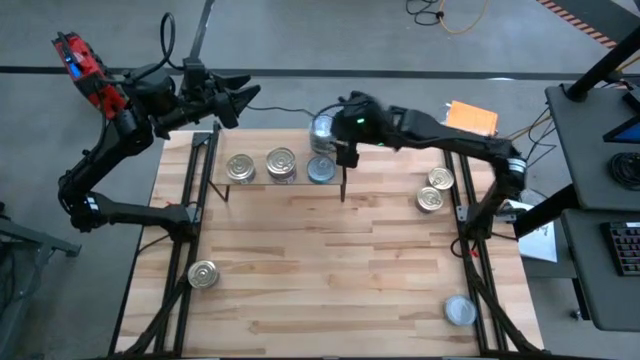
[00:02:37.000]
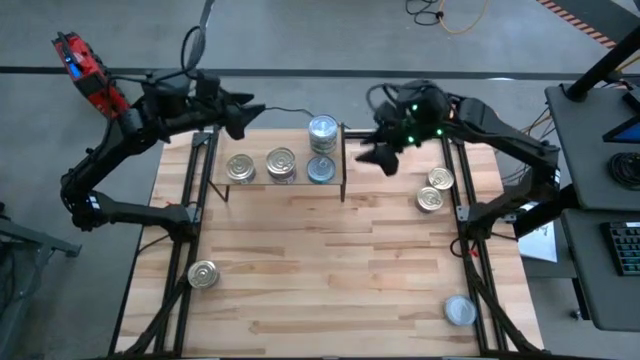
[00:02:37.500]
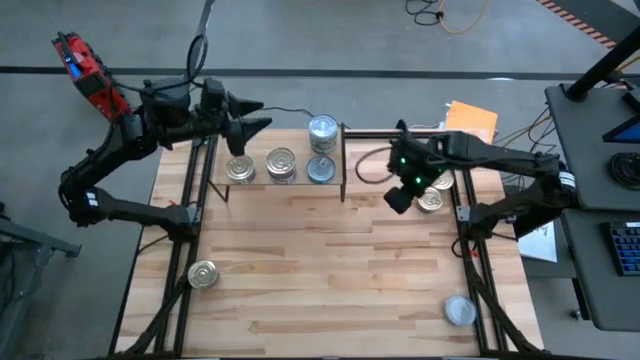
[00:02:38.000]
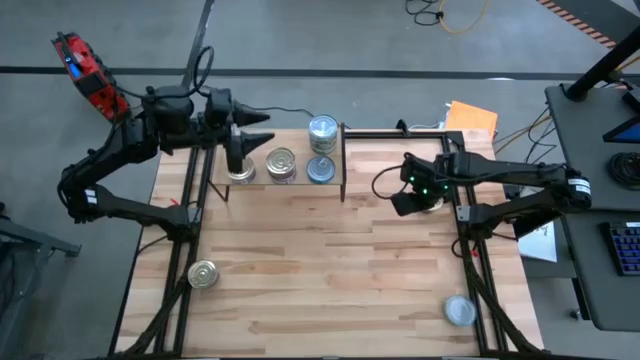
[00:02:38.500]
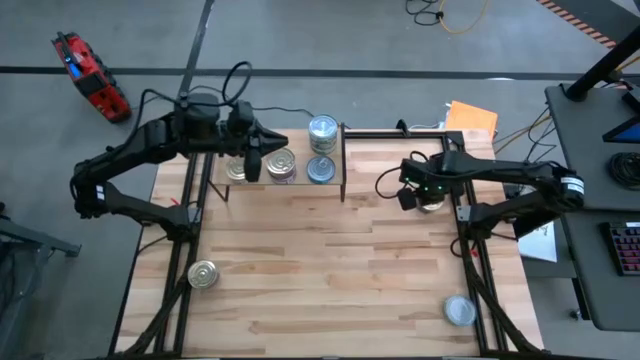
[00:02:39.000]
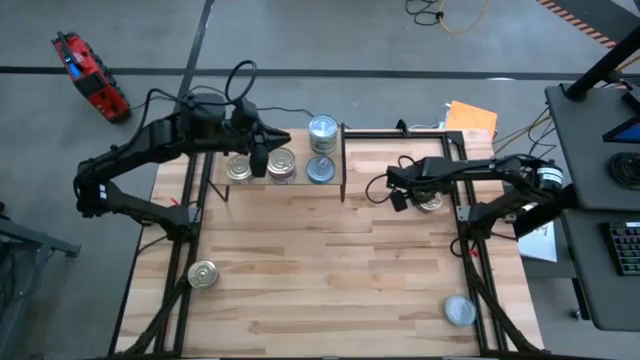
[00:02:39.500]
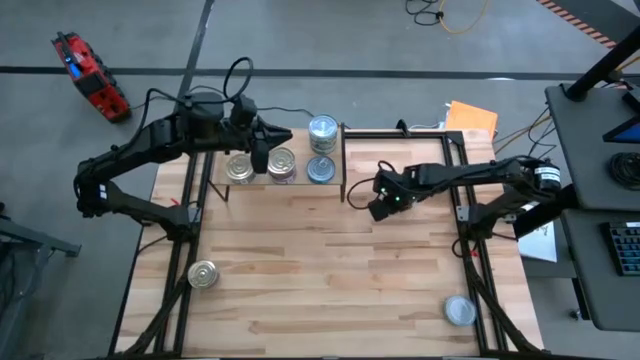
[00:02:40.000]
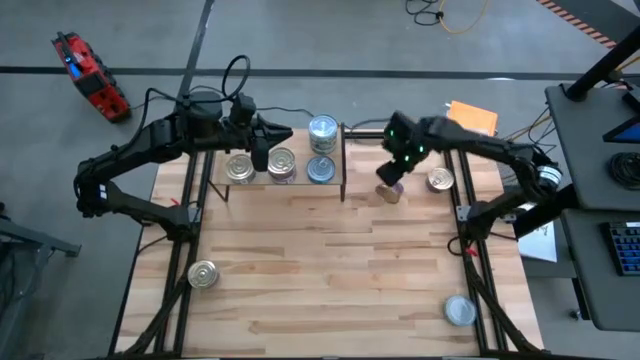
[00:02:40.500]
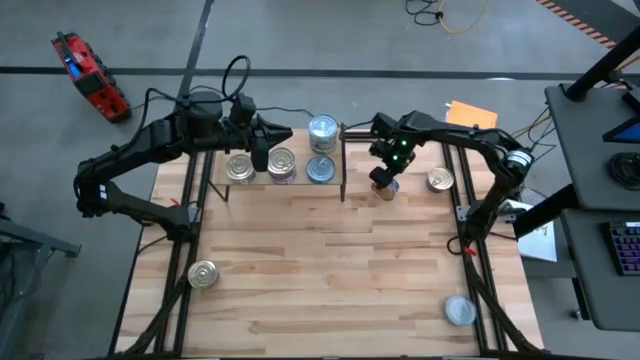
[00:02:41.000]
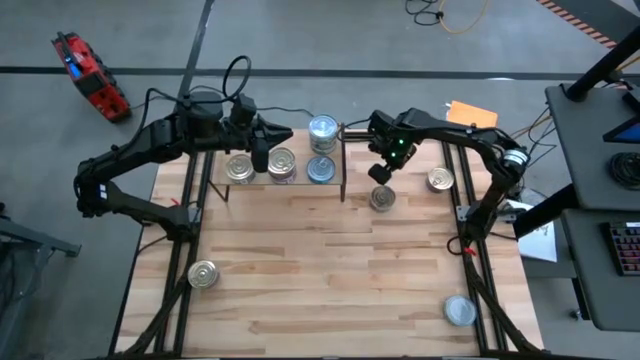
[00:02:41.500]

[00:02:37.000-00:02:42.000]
Task: Stack canned seafood by type on shelf
Move the blue and pink tuna can to the center of the table

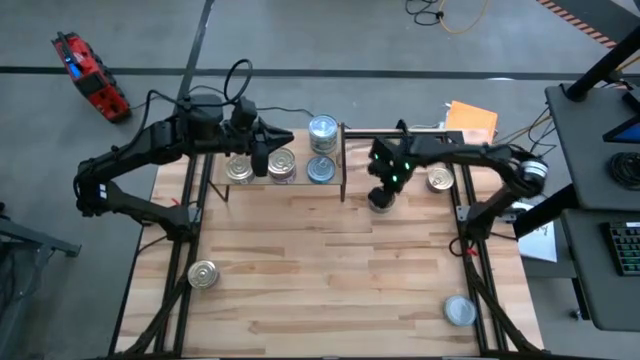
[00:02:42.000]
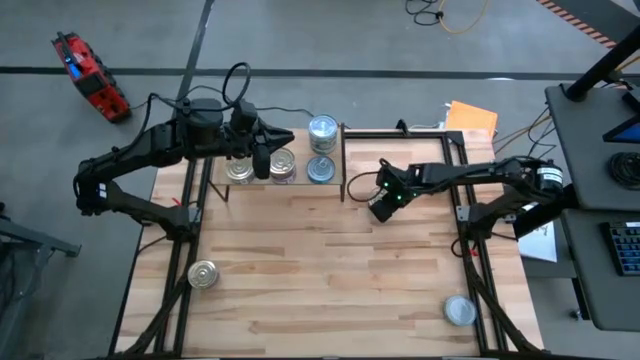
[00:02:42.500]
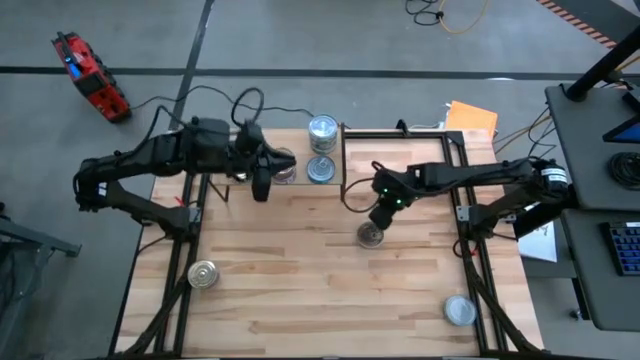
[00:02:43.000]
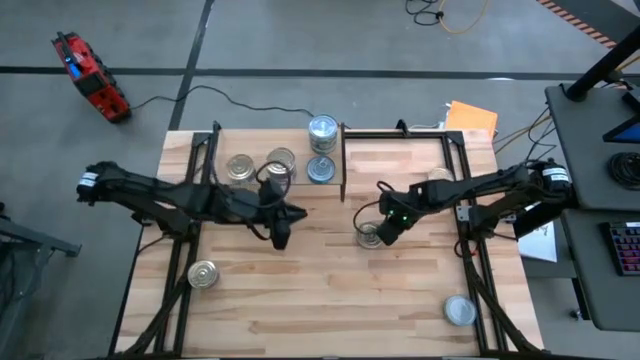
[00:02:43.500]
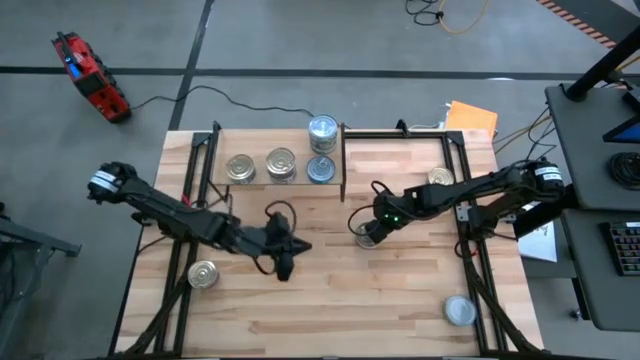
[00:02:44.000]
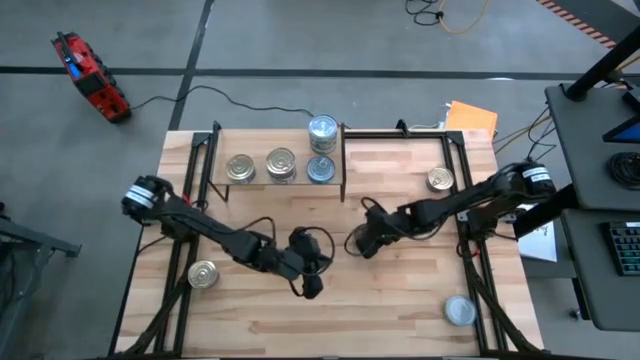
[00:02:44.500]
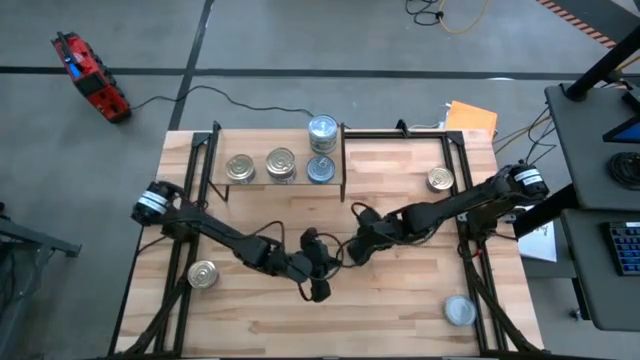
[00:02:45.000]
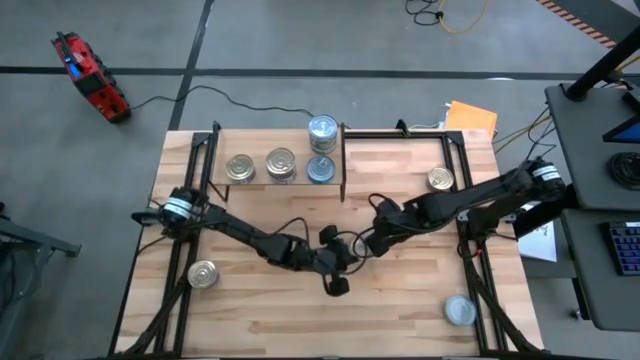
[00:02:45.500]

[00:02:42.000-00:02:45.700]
Move the blue and pink tuna can to the center of the table

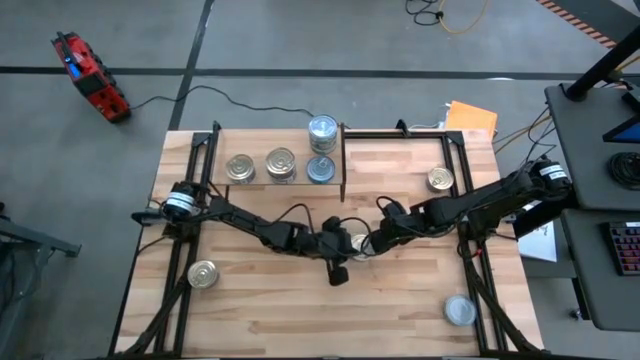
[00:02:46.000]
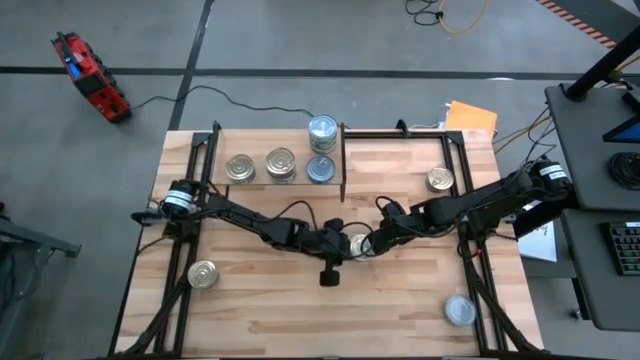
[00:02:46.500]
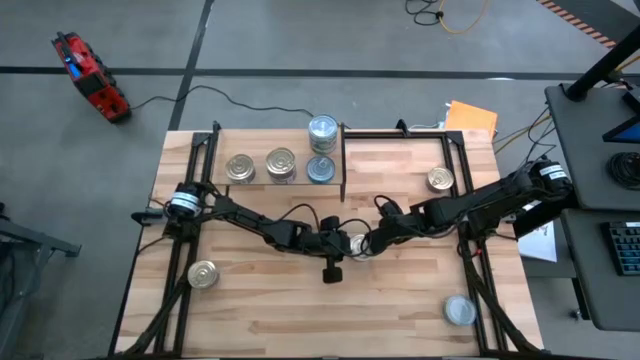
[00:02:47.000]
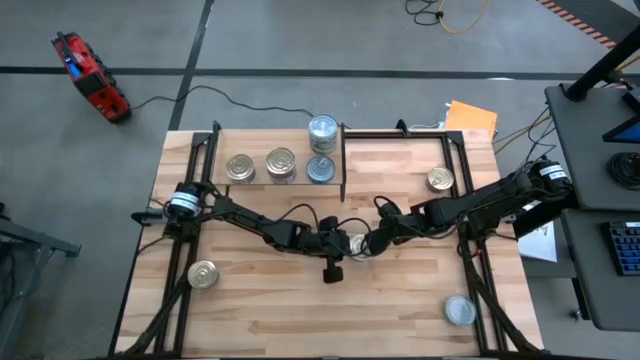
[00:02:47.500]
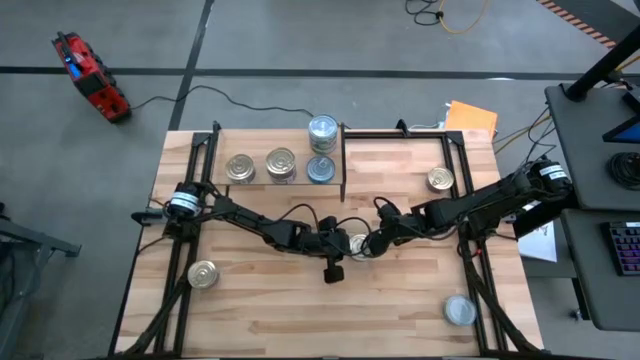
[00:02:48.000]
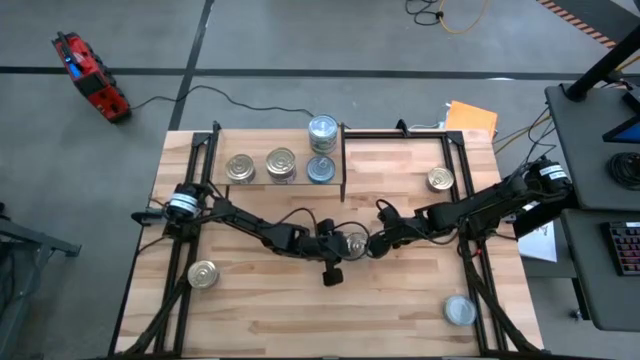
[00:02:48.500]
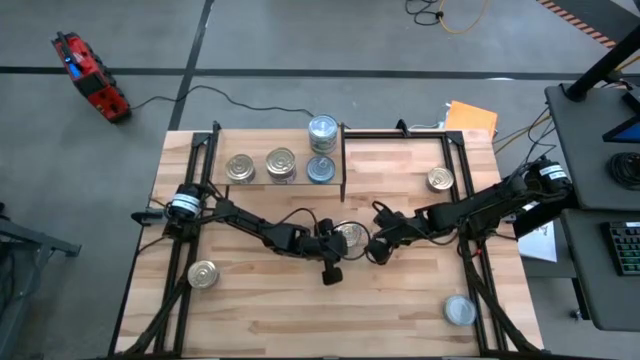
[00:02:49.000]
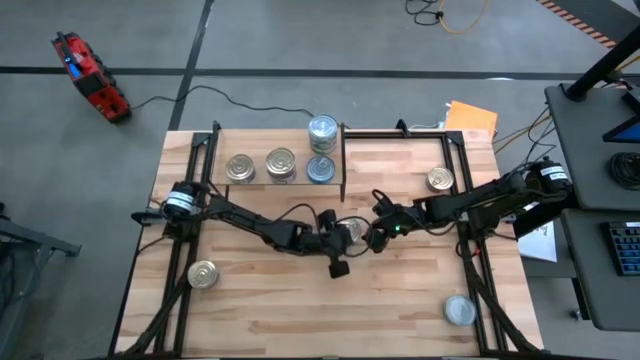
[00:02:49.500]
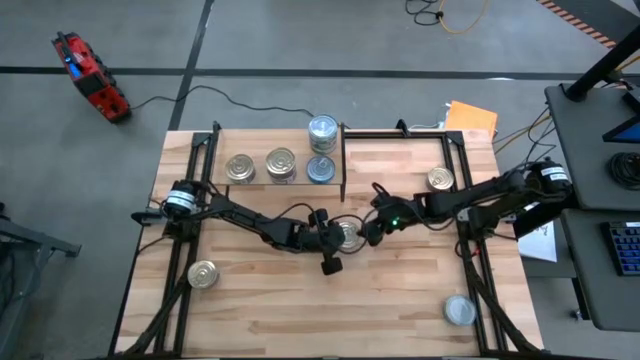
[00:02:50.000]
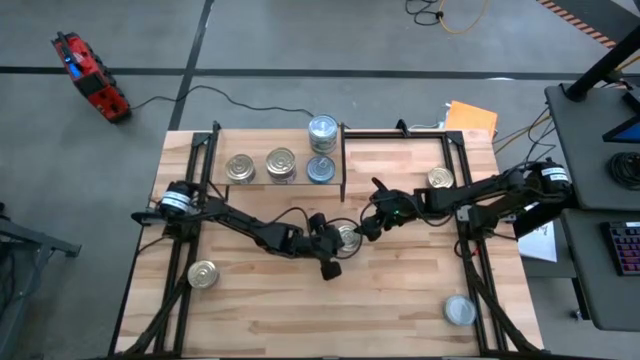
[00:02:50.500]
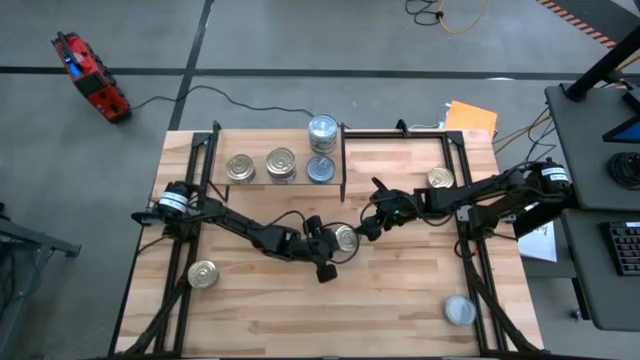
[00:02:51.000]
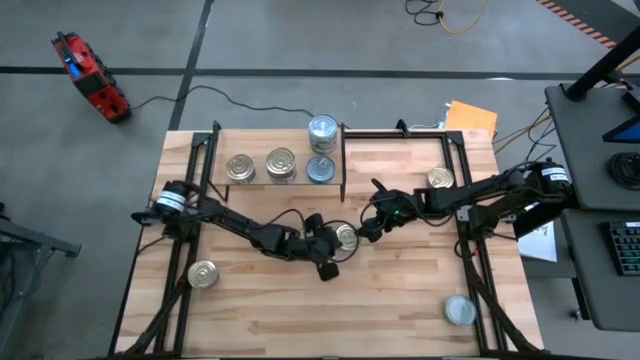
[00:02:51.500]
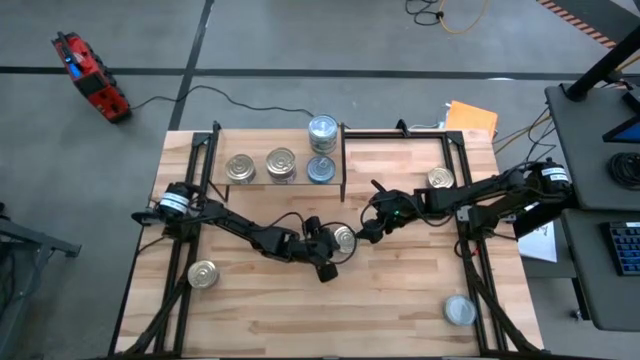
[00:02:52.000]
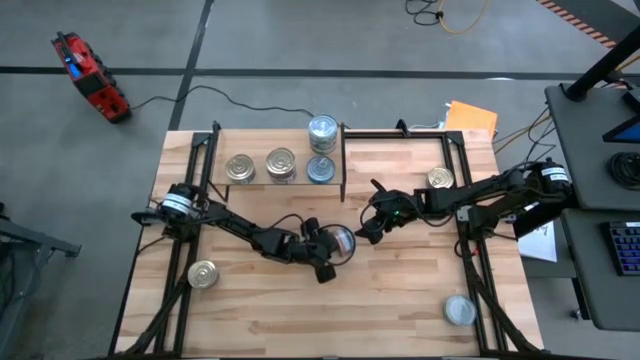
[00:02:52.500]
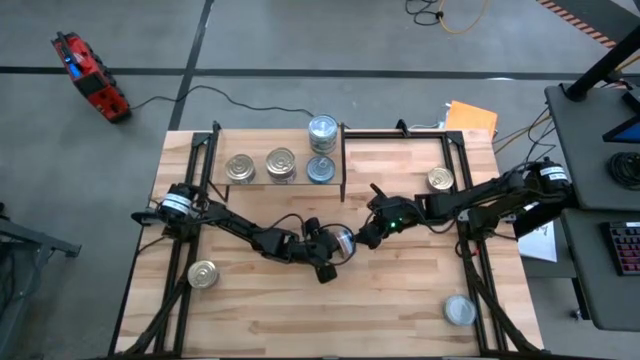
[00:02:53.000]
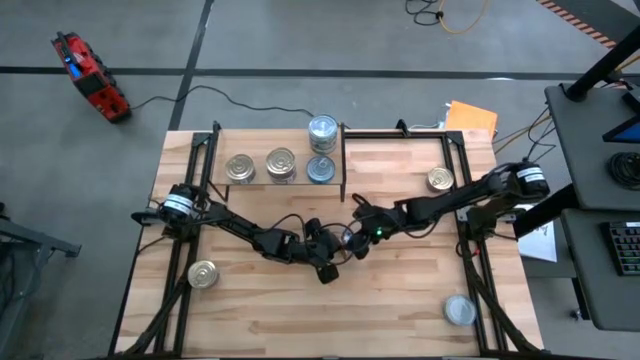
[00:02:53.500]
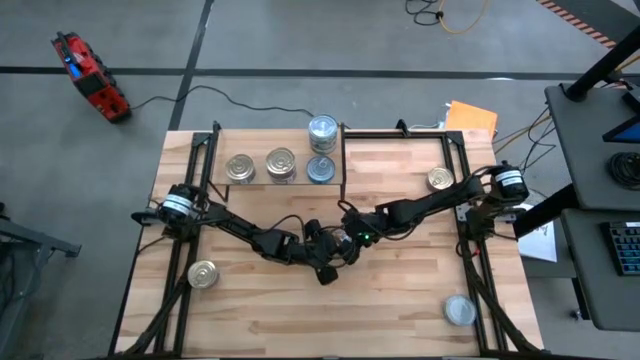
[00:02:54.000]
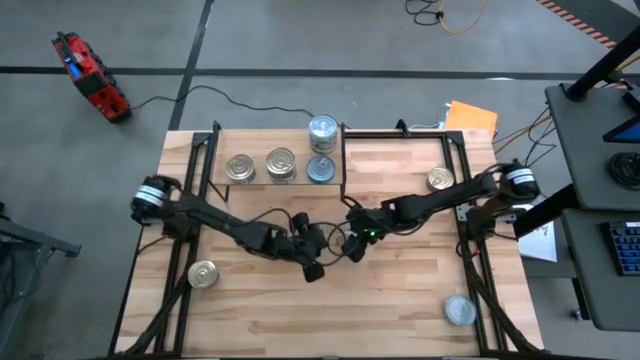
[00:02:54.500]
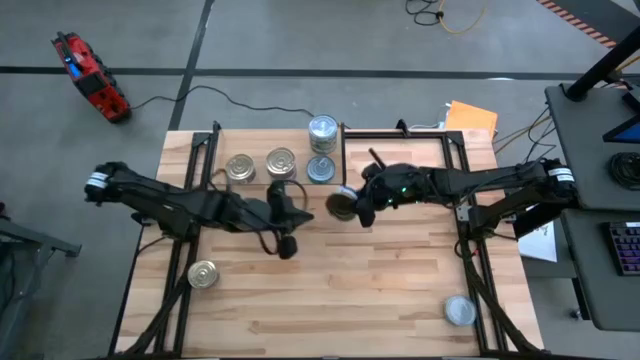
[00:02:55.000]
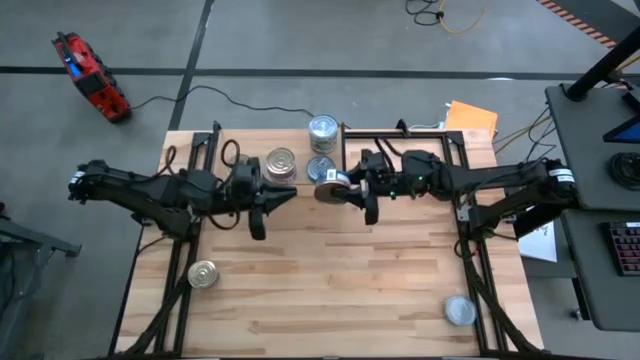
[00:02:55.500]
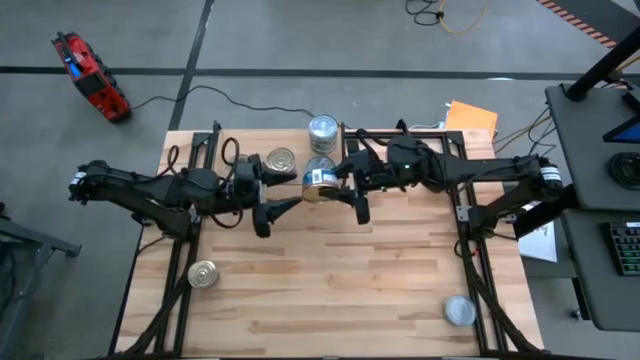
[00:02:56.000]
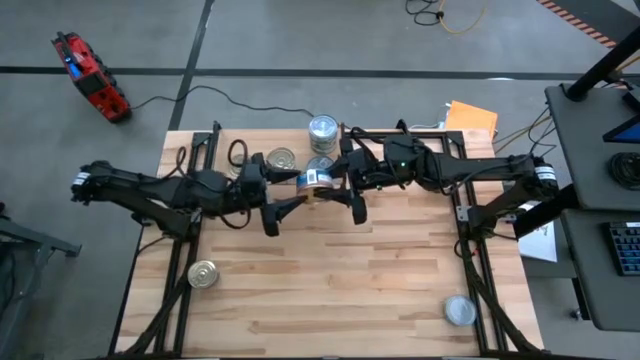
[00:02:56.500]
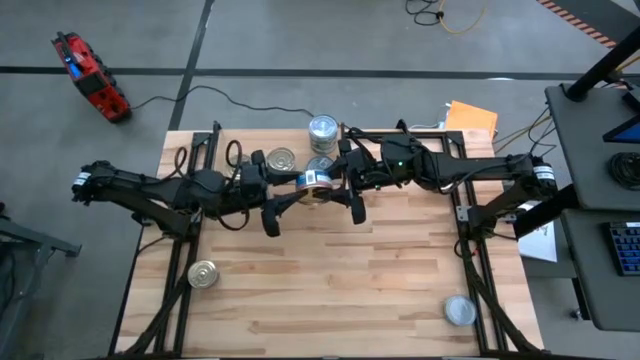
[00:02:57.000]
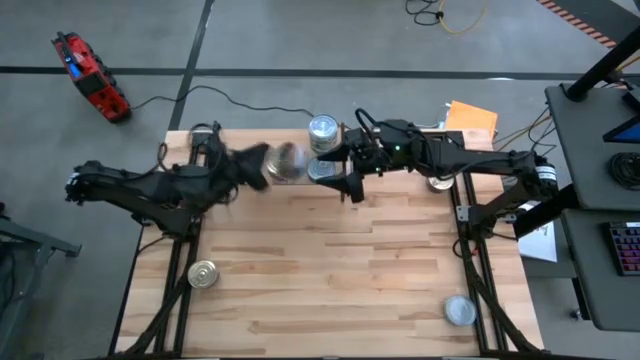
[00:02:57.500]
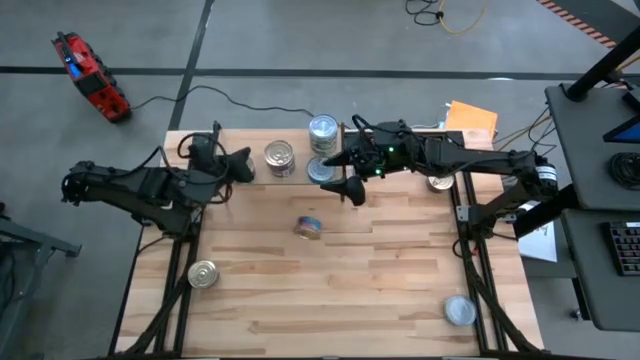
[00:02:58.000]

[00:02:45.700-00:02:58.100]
Stack the blue and pink tuna can on top of the blue and pink tuna can on the shelf
